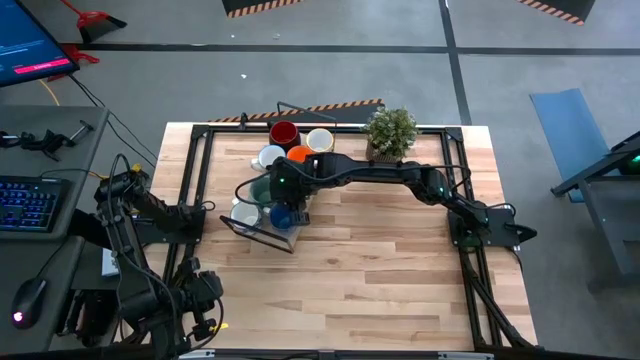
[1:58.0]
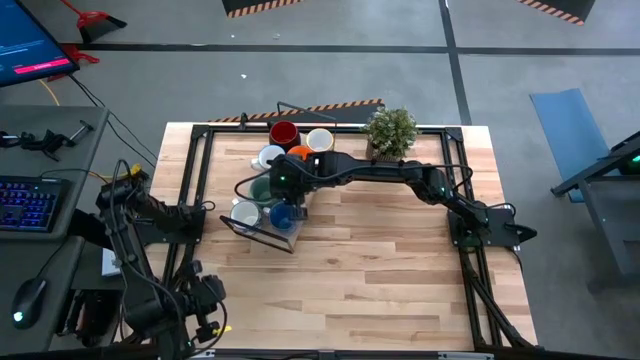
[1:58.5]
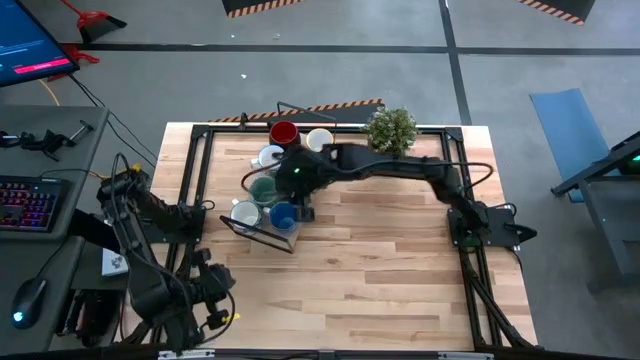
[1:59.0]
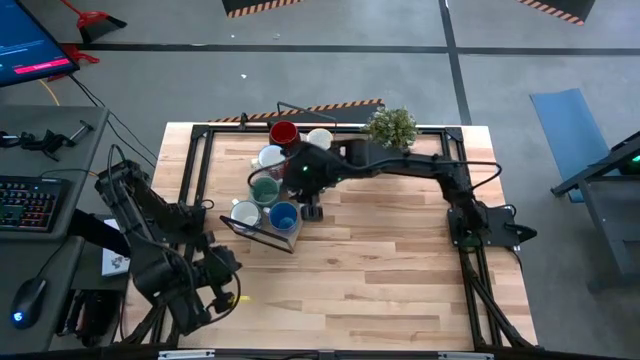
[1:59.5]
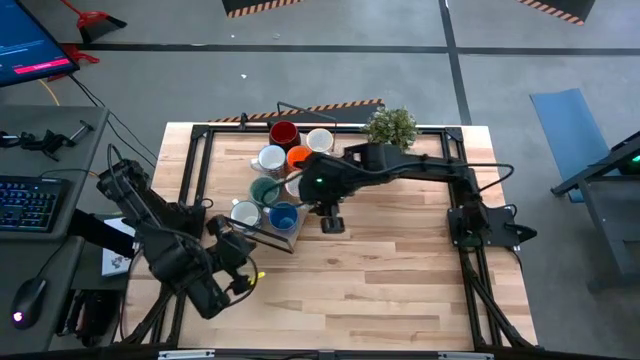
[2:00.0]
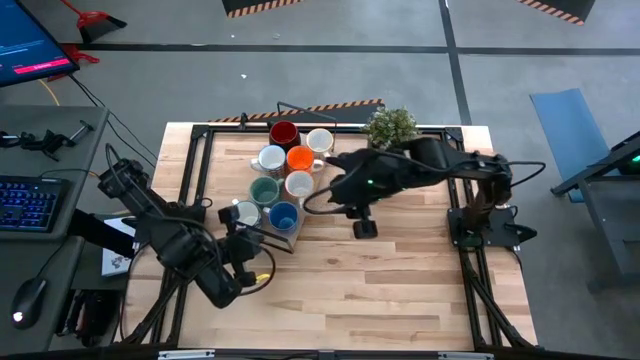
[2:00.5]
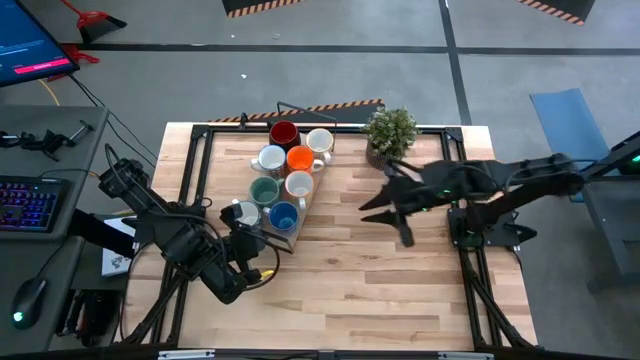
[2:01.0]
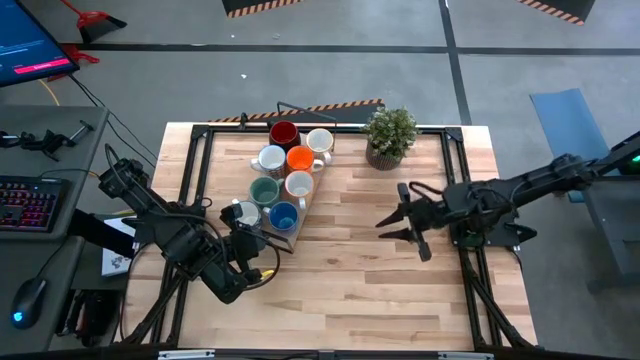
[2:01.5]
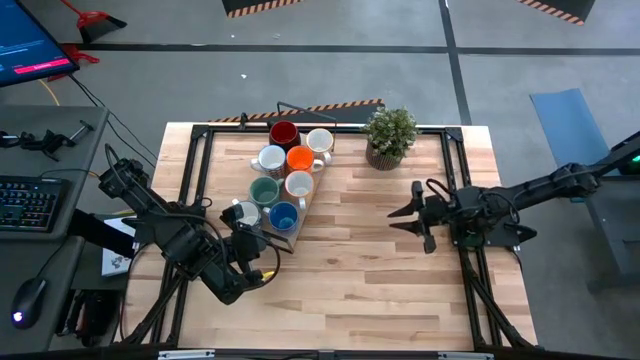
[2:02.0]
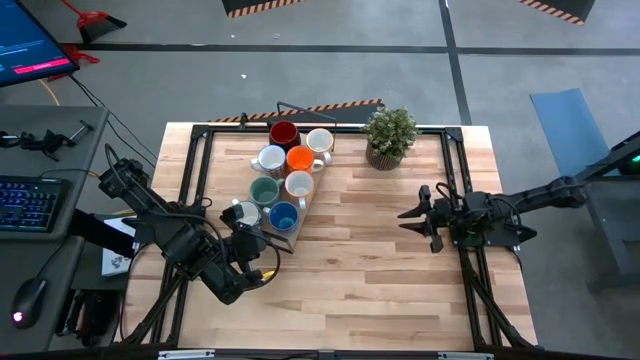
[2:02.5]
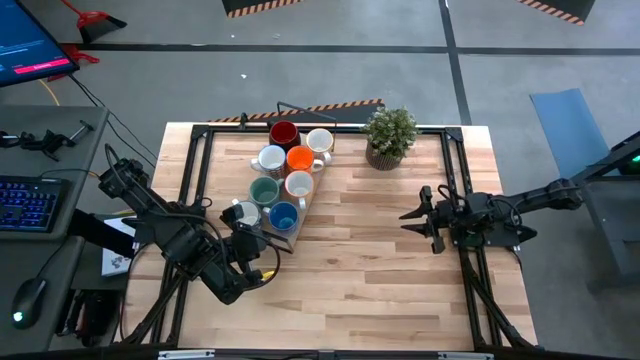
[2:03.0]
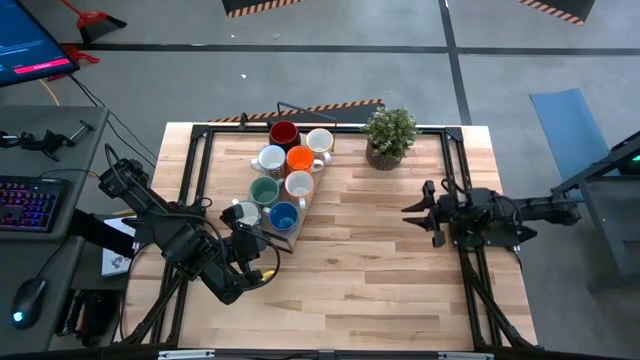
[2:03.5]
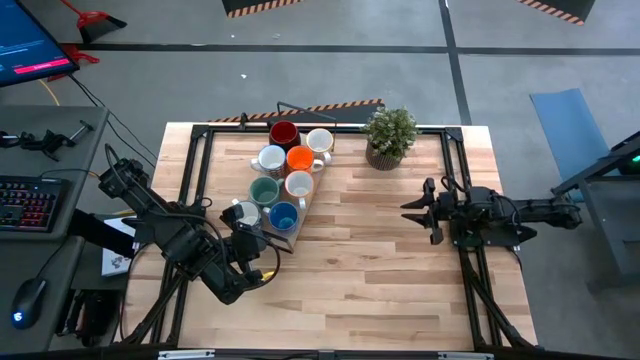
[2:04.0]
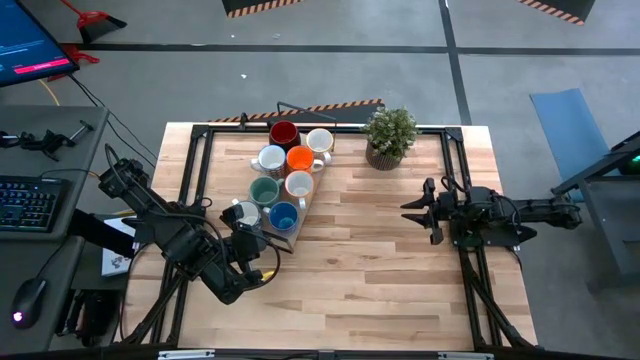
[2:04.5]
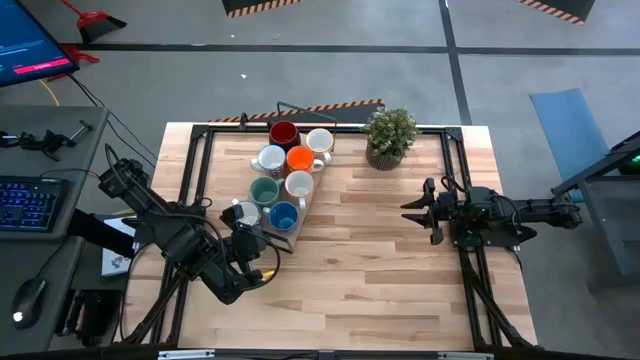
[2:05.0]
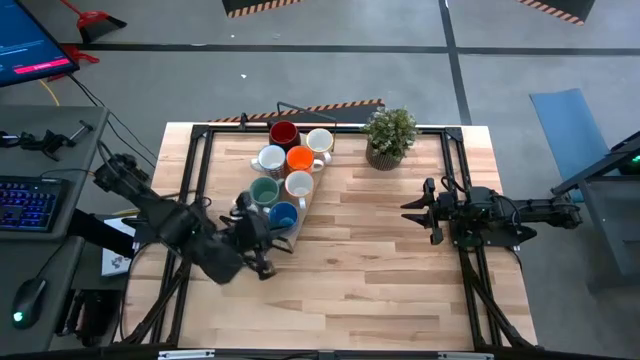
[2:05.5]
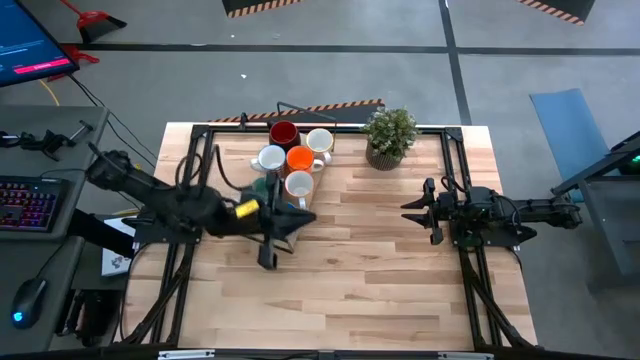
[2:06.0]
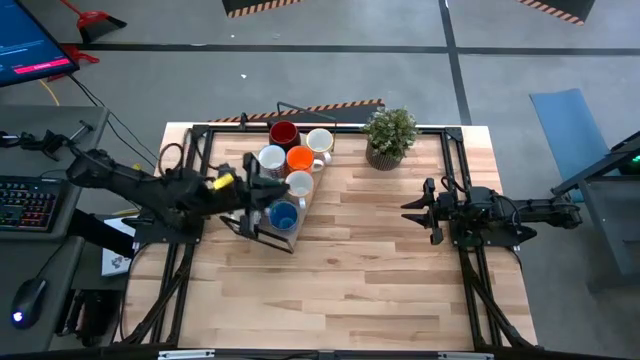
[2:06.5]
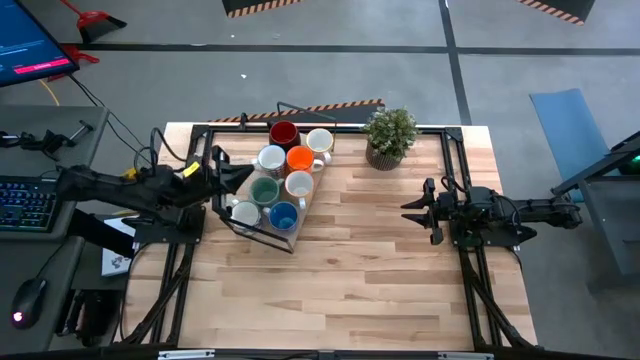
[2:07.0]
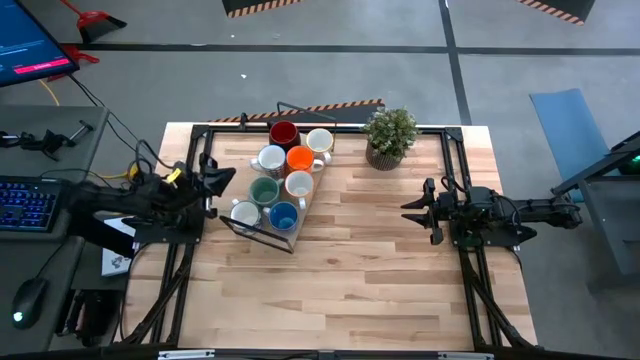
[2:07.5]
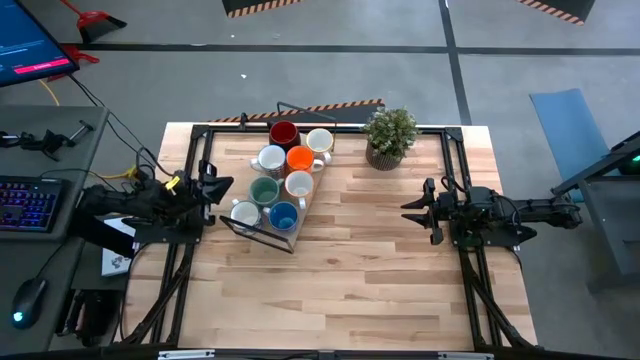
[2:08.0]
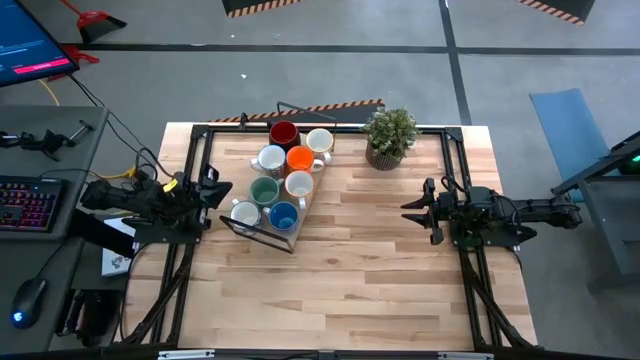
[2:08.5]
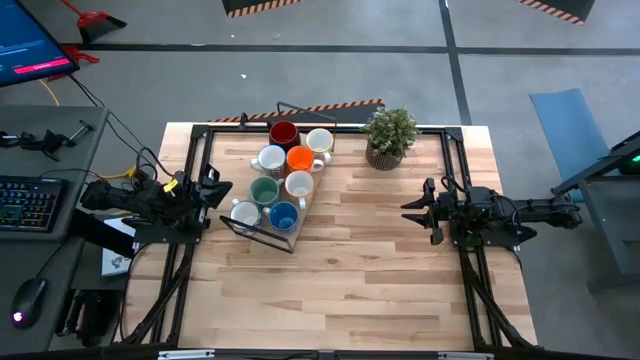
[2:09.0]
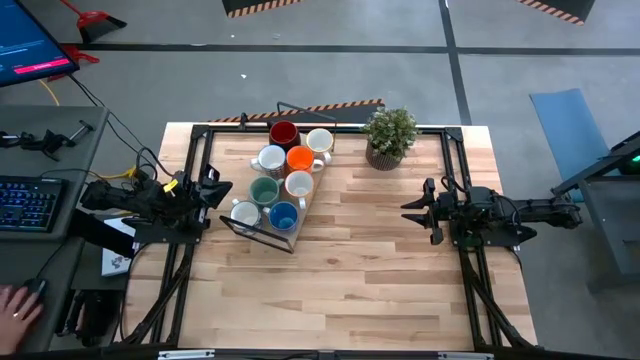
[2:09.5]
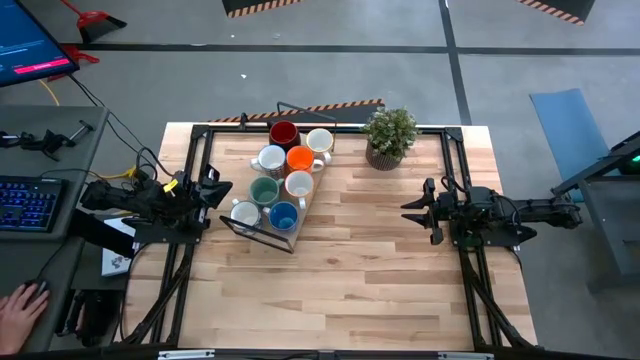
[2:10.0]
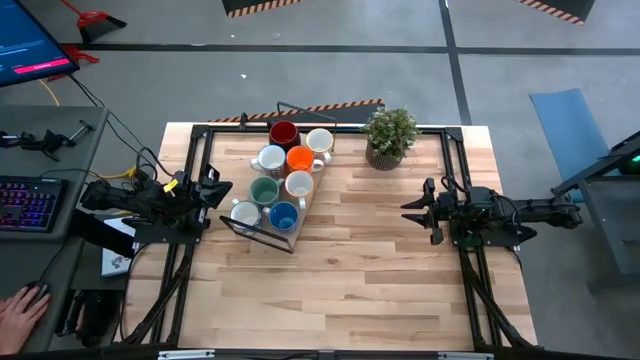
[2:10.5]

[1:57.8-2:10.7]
Task: Place coffee mugs
Return to Home Position

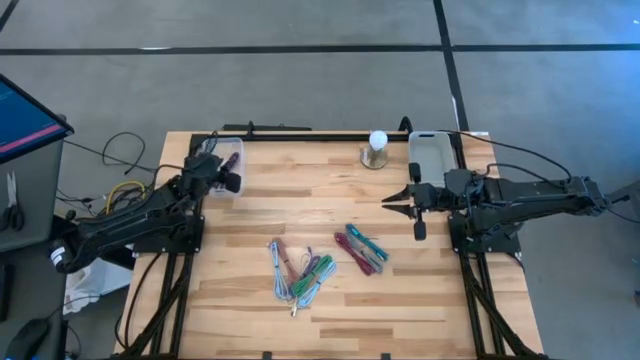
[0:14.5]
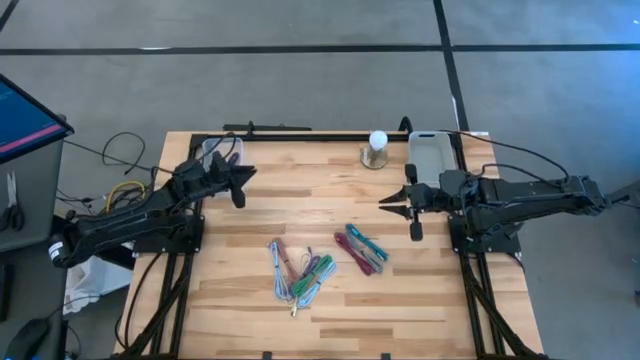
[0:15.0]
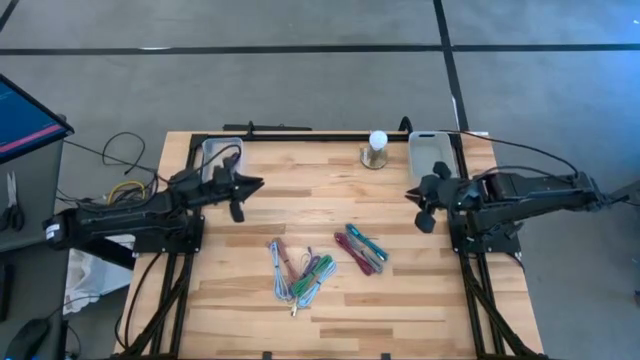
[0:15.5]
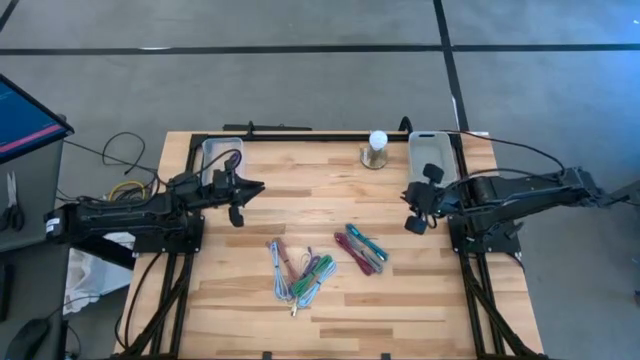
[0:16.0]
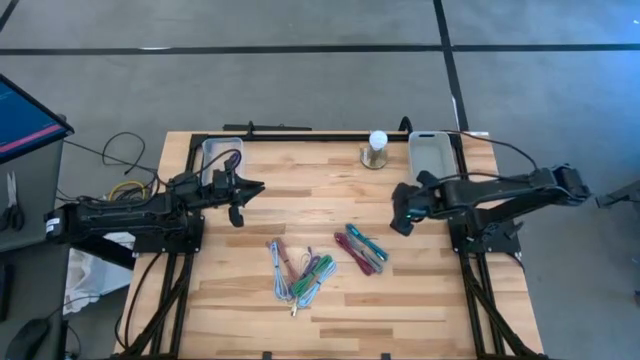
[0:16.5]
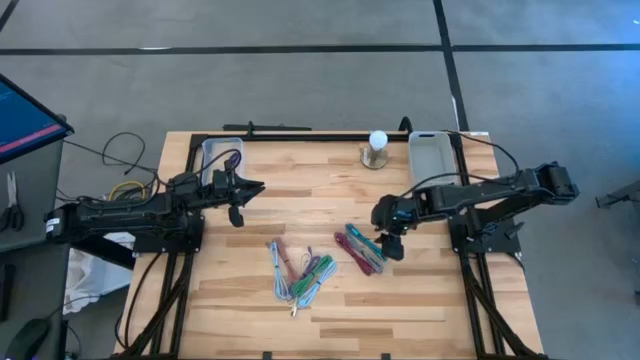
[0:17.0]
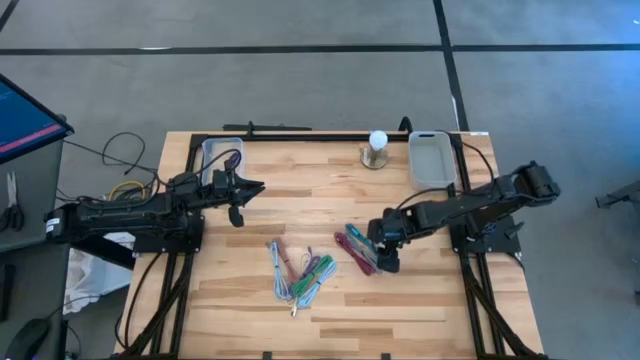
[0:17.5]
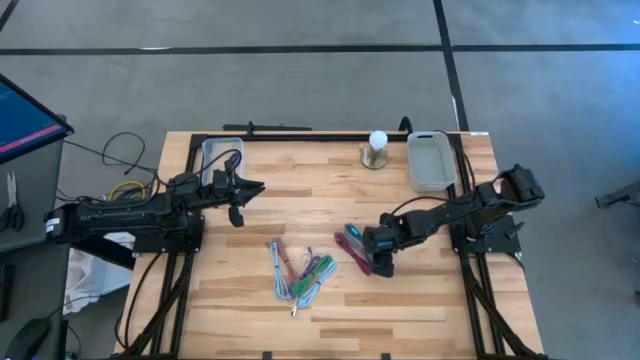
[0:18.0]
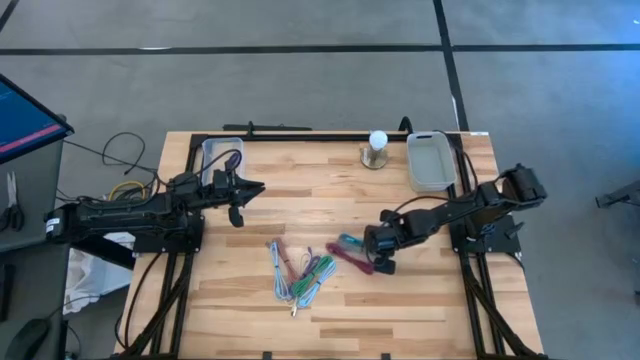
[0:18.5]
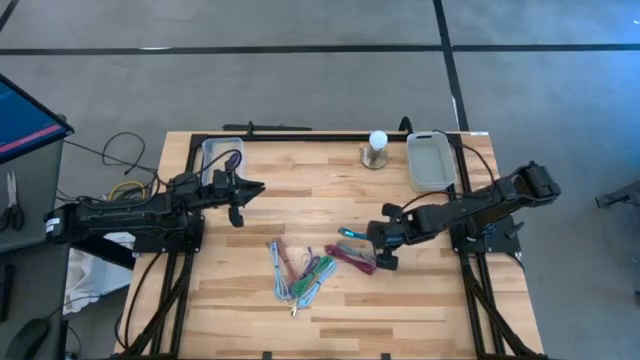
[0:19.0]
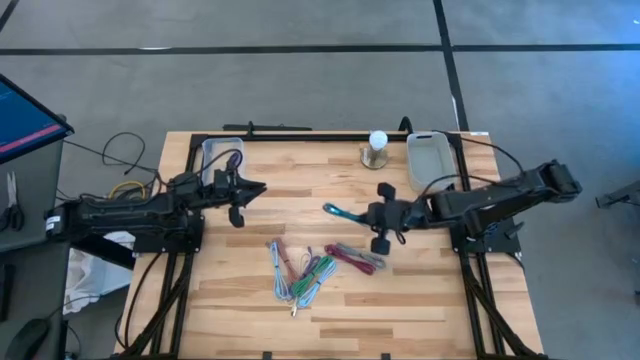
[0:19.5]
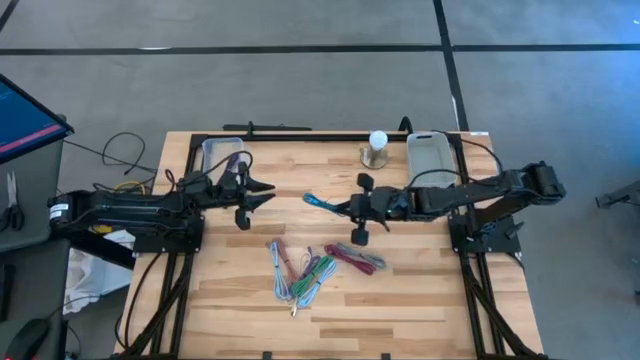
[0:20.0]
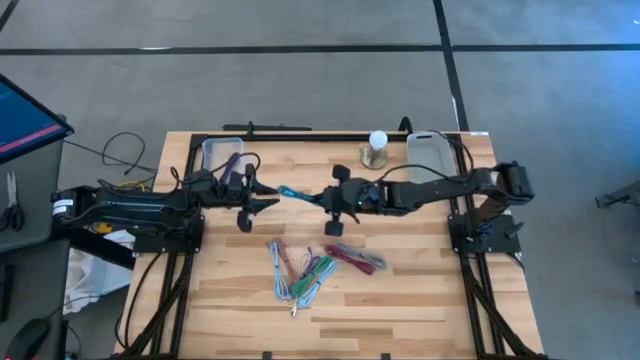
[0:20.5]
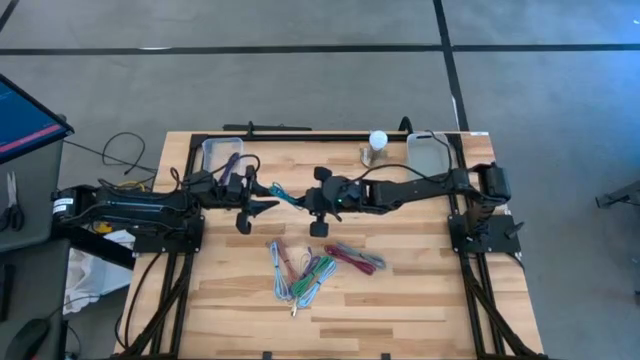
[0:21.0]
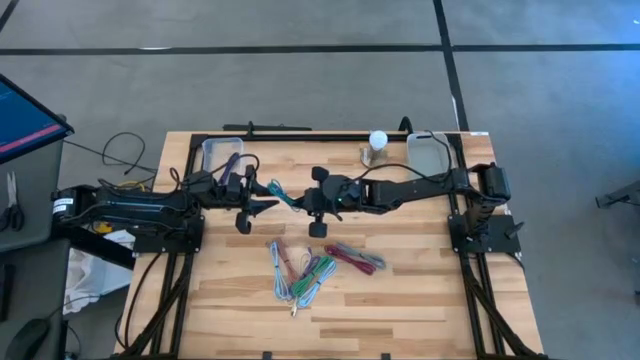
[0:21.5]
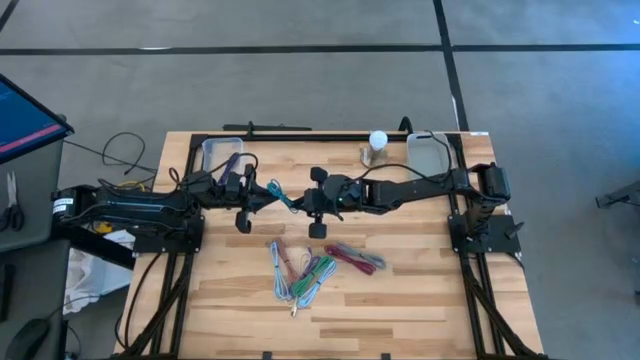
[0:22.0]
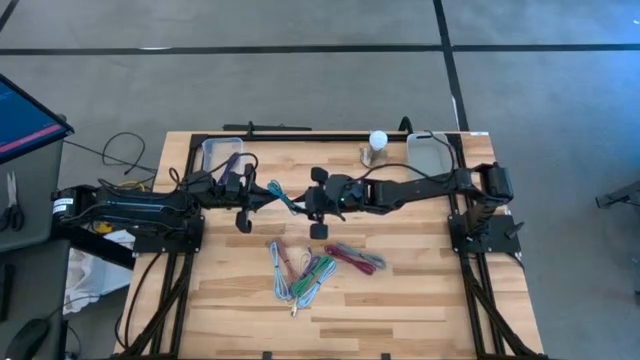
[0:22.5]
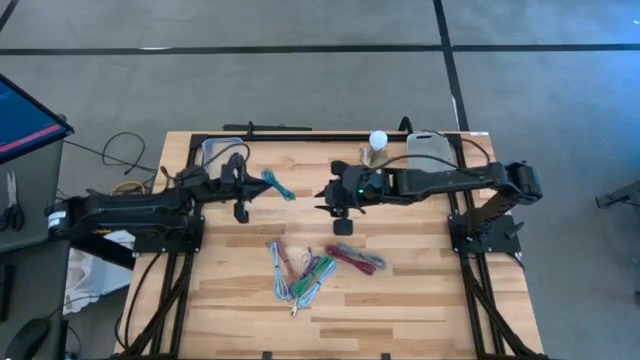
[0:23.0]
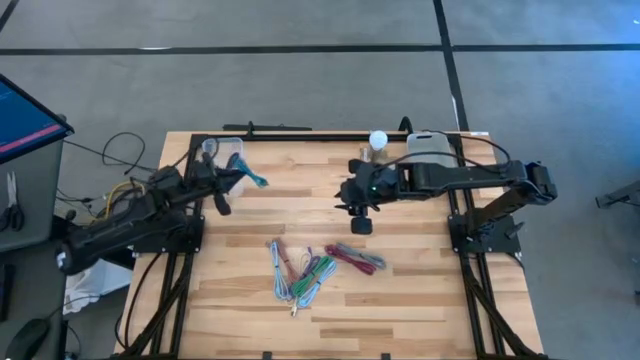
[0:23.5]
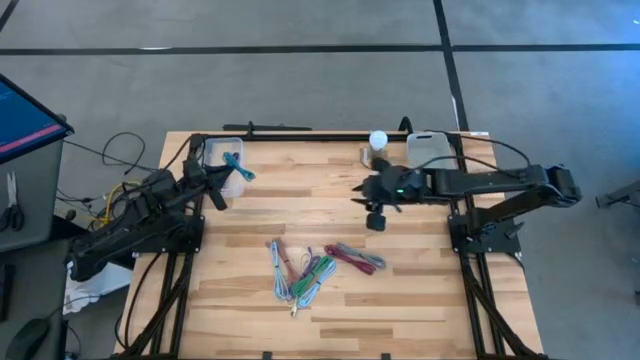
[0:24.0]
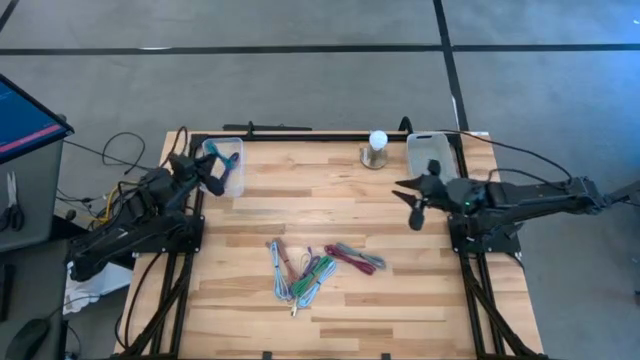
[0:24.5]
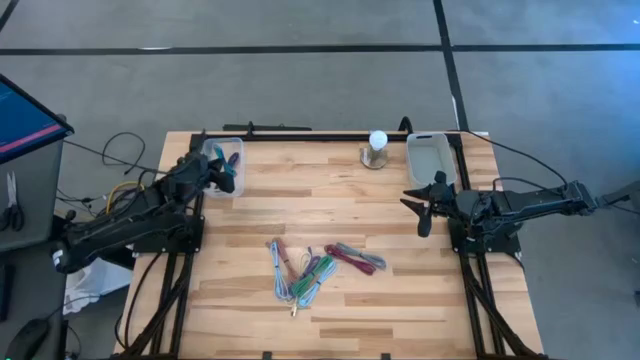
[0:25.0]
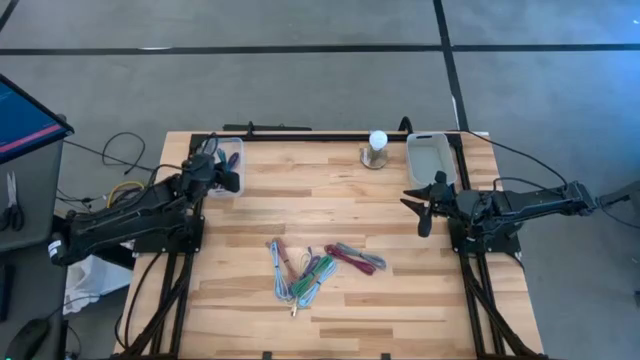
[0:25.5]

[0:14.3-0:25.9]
Task: Pick & Place USB Port
Put the blue and black charger cable into the transparent bin
